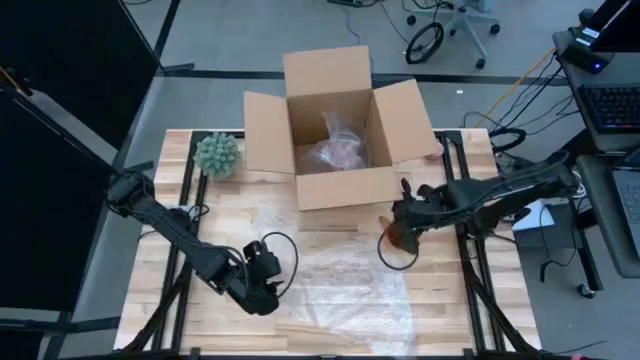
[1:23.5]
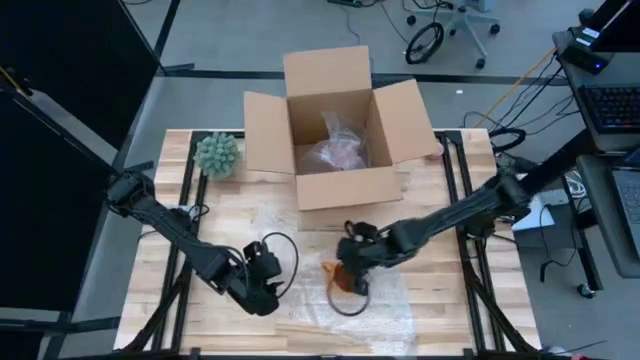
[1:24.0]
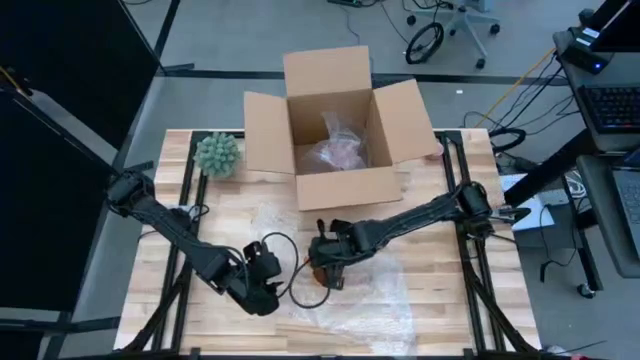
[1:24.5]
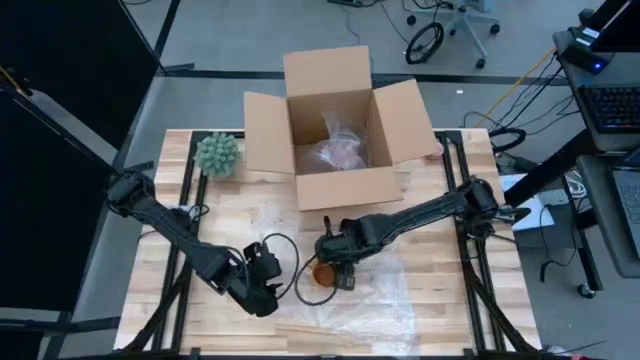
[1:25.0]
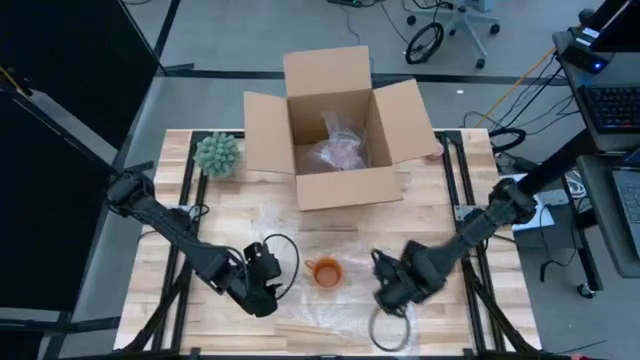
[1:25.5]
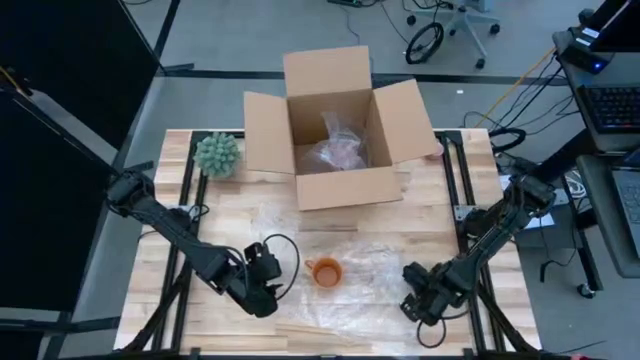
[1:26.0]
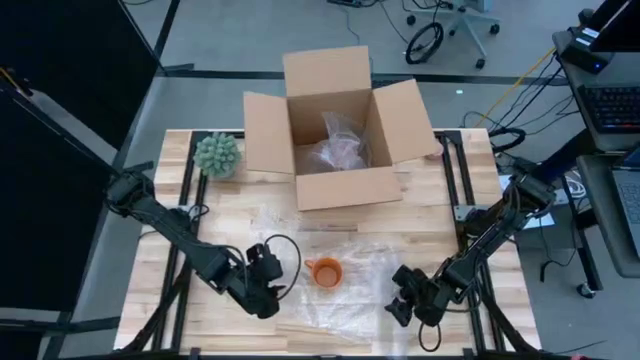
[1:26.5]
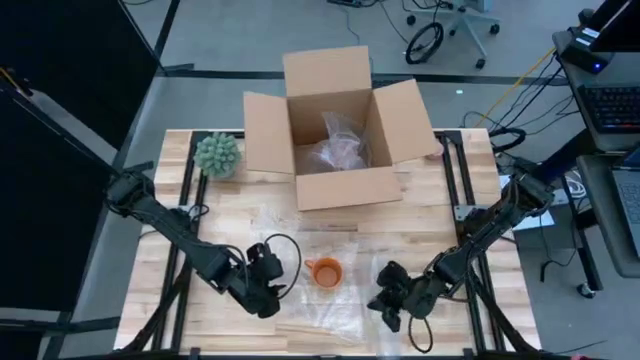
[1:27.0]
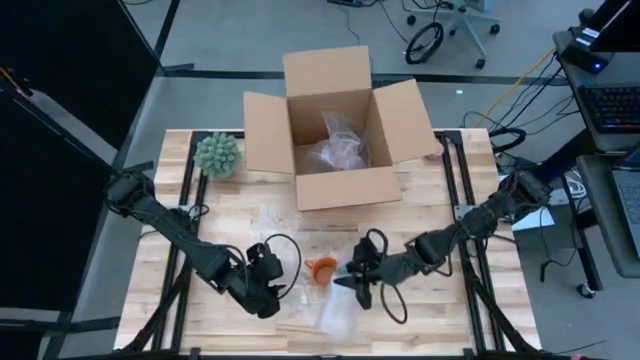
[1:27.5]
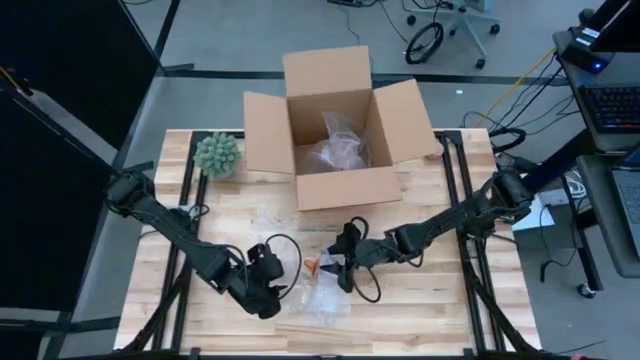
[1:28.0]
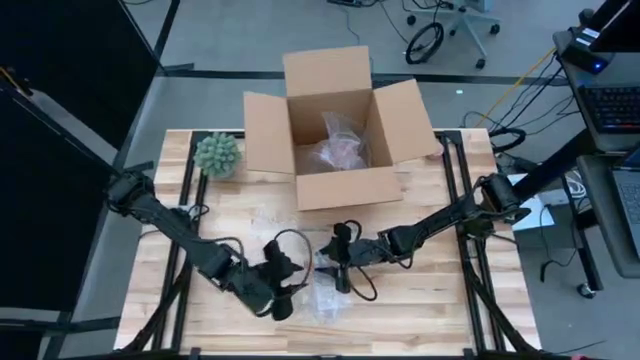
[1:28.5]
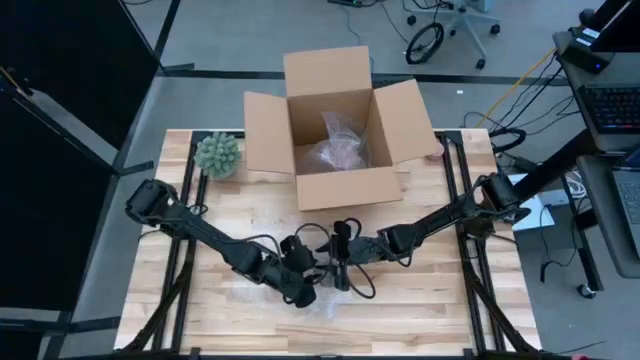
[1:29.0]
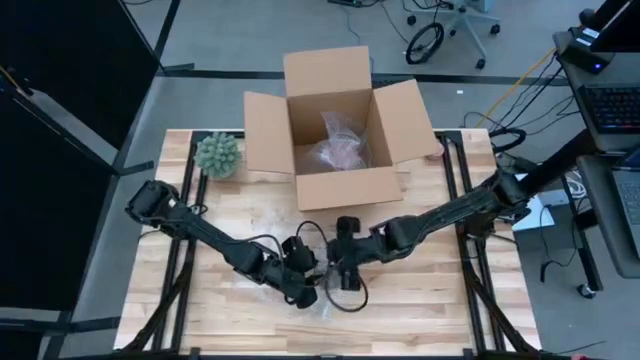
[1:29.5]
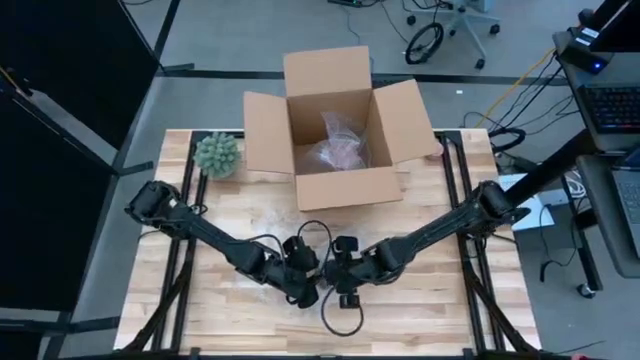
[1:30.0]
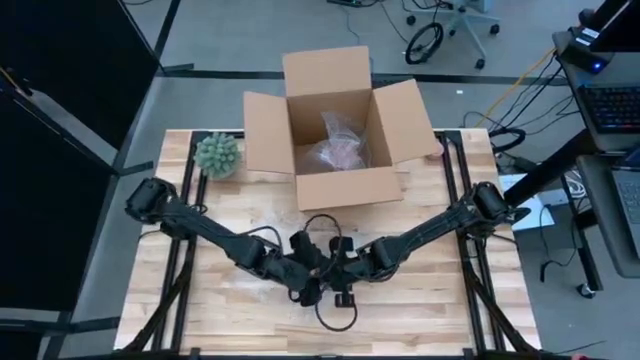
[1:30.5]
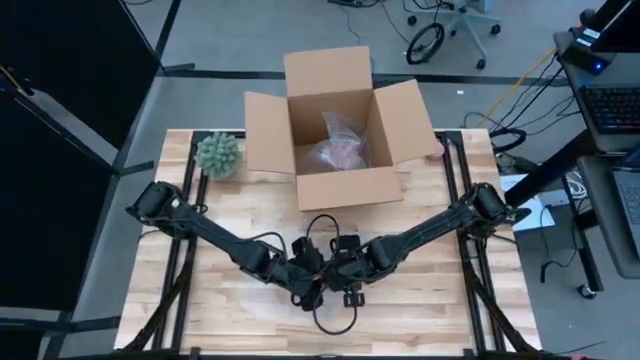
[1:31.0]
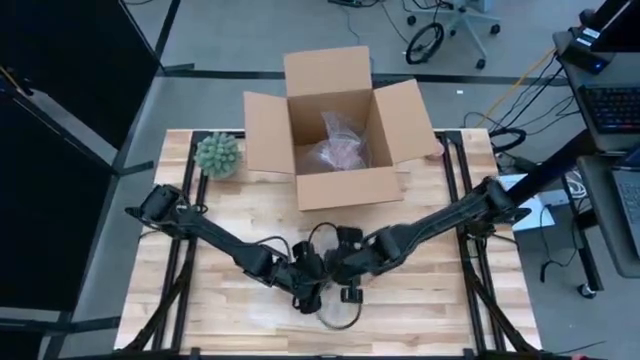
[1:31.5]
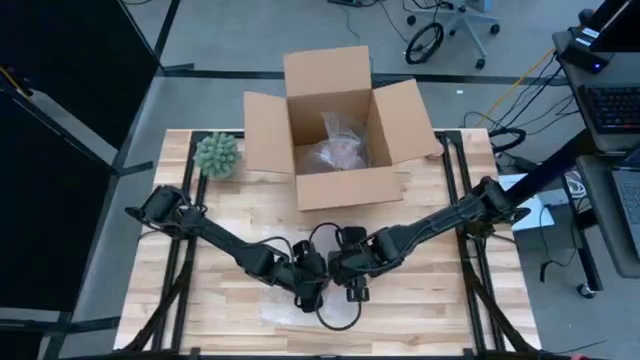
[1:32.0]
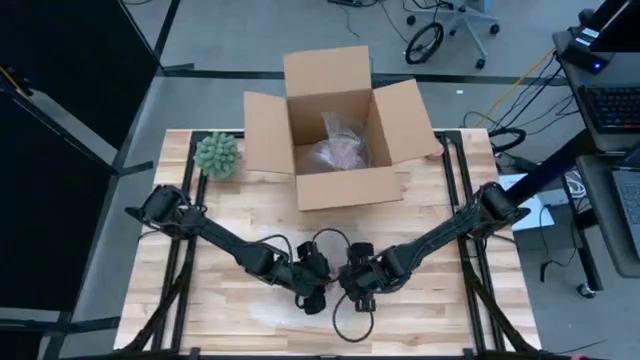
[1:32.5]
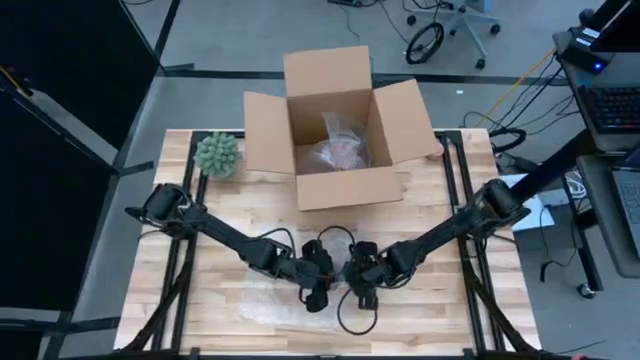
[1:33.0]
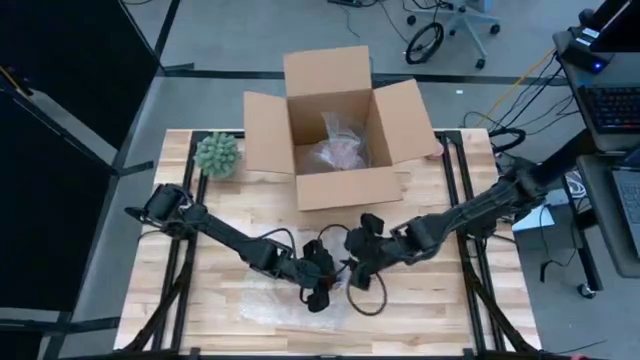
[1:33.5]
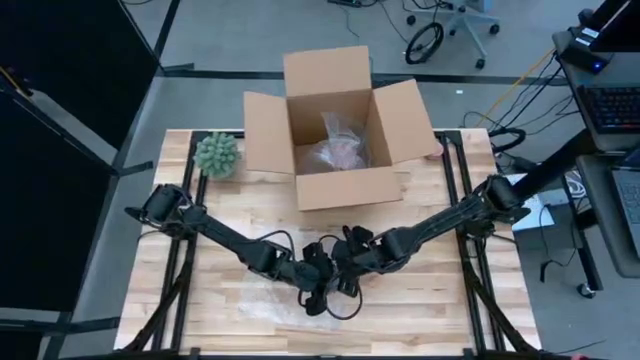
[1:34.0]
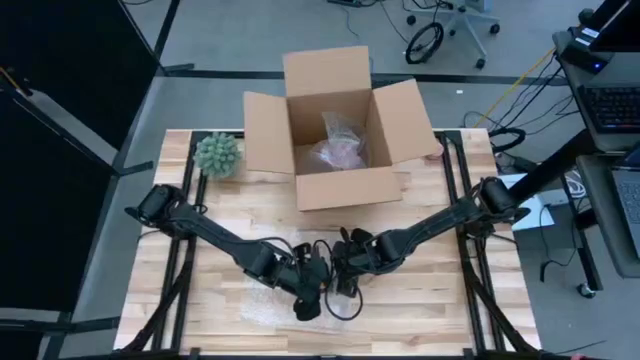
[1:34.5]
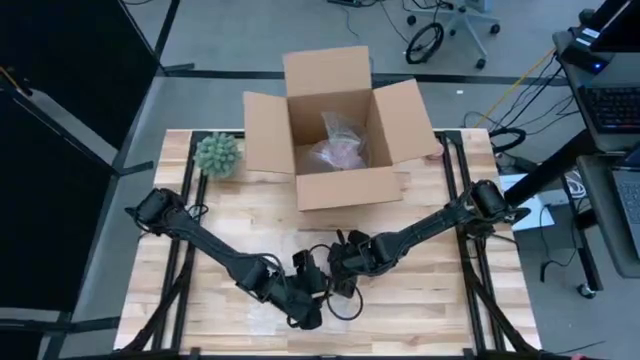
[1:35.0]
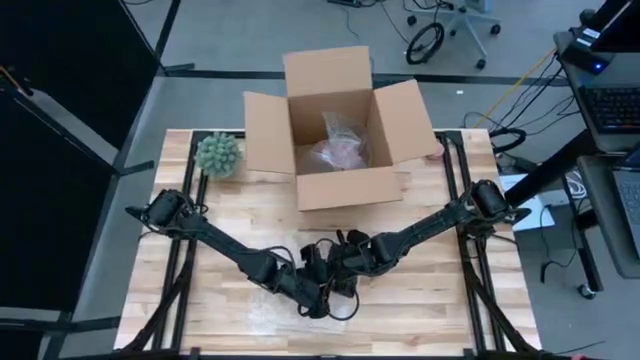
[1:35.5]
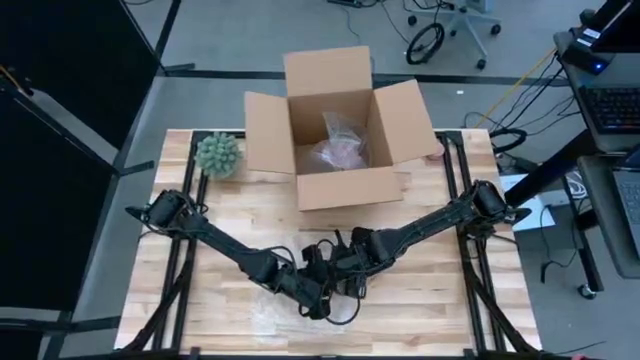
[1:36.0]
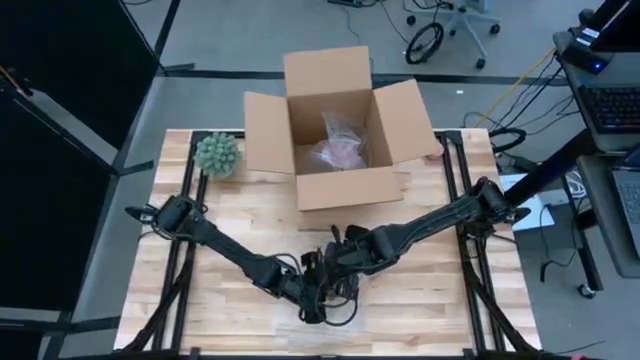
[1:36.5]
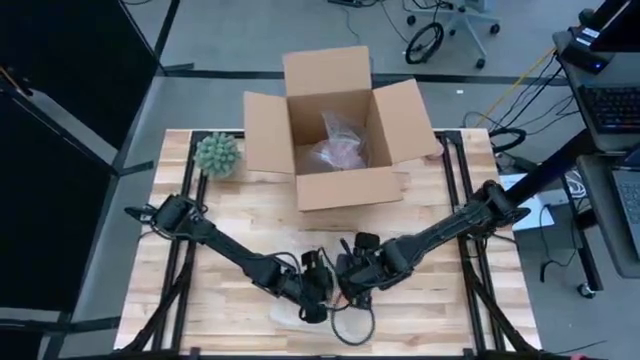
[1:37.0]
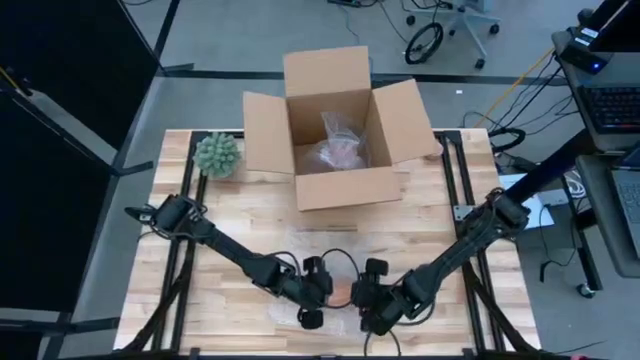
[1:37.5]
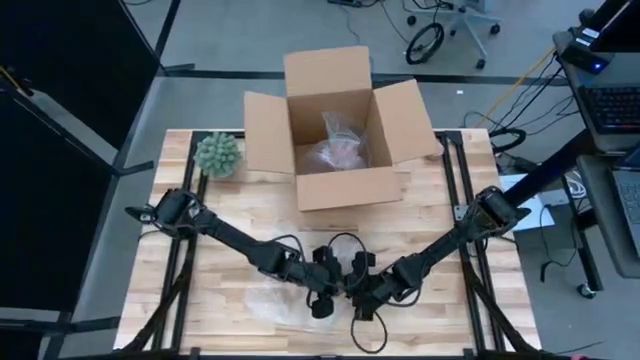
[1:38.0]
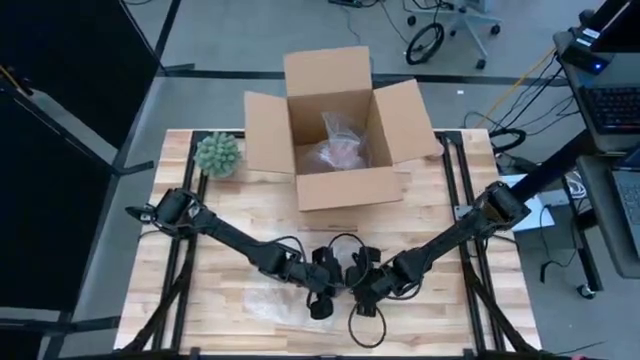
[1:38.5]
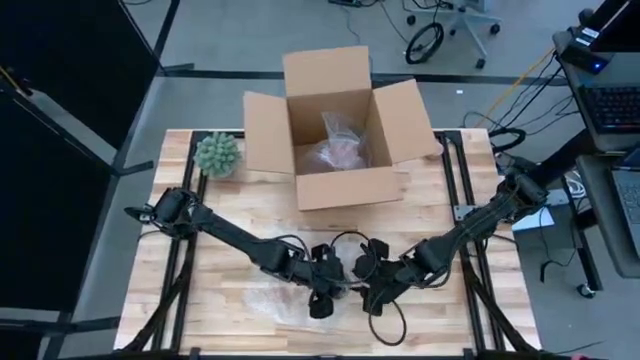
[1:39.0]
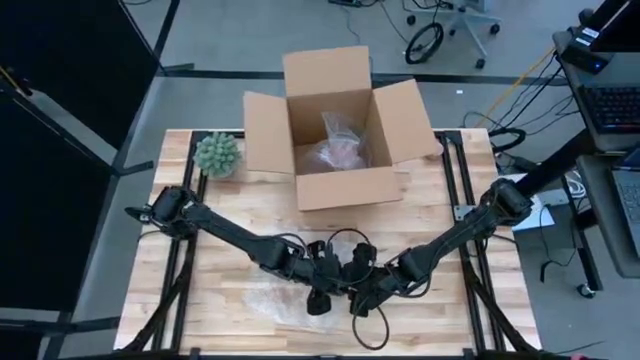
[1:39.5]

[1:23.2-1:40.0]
Task: wrap mug
Wrap the orange mug with the left bubble wrap

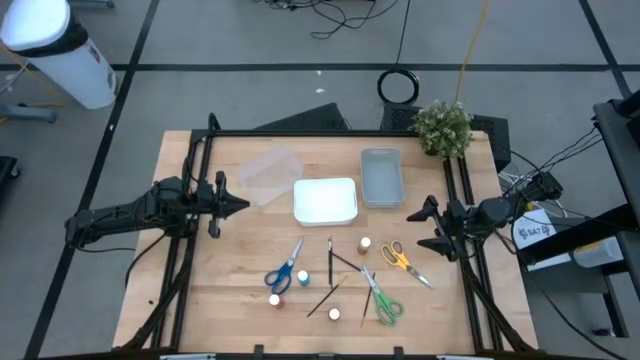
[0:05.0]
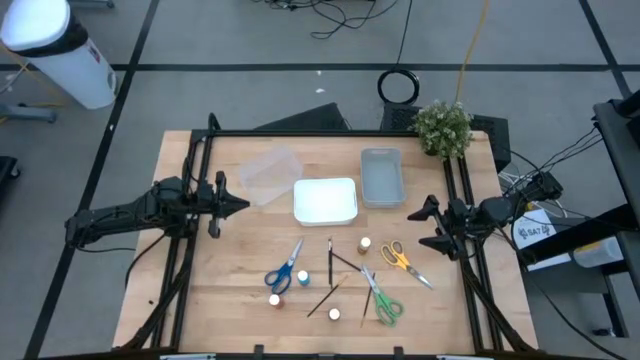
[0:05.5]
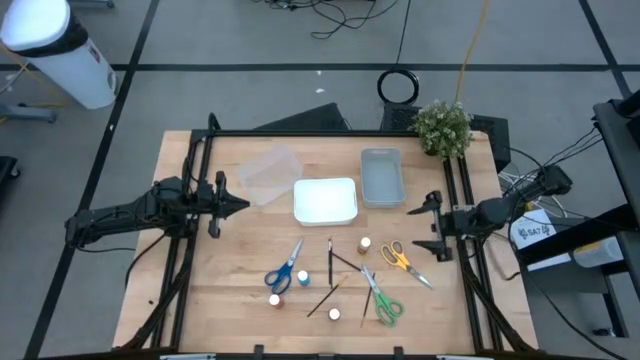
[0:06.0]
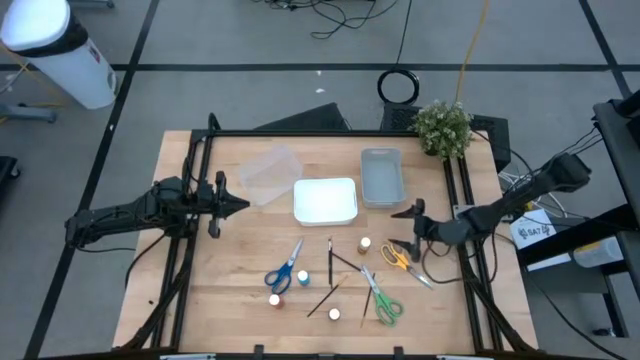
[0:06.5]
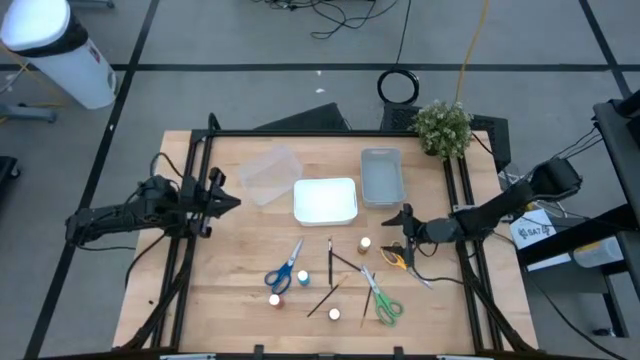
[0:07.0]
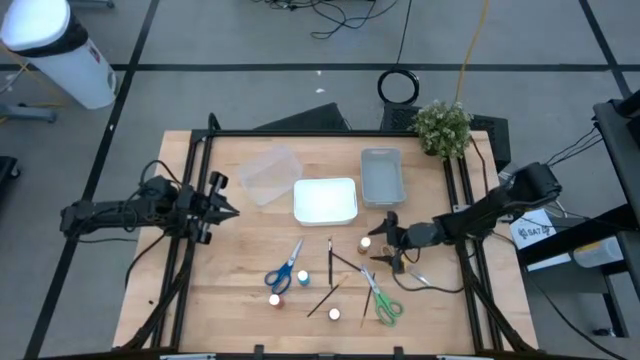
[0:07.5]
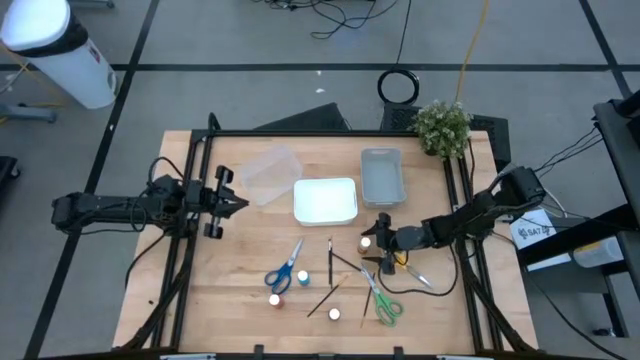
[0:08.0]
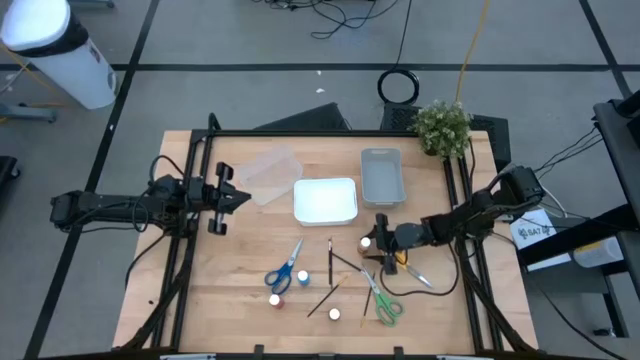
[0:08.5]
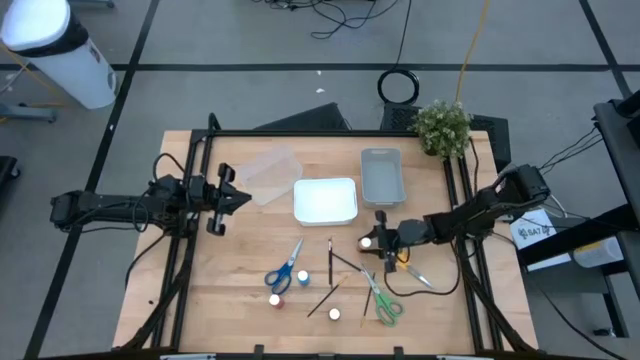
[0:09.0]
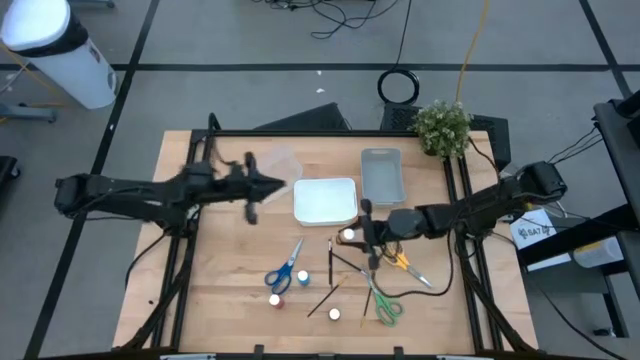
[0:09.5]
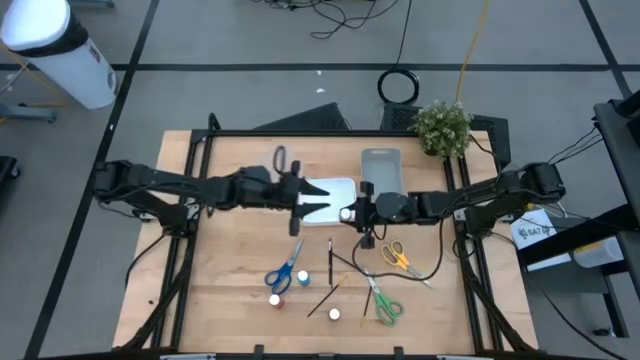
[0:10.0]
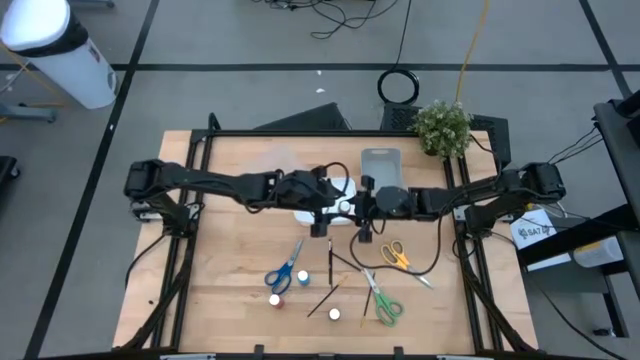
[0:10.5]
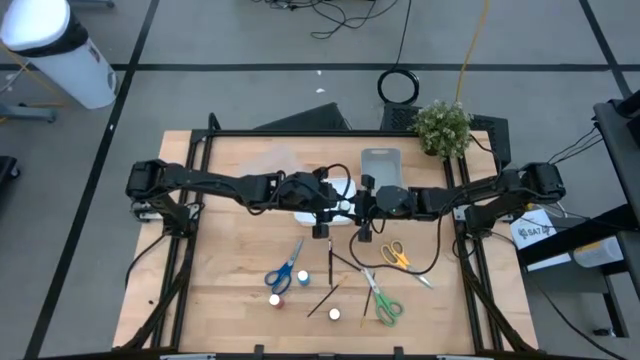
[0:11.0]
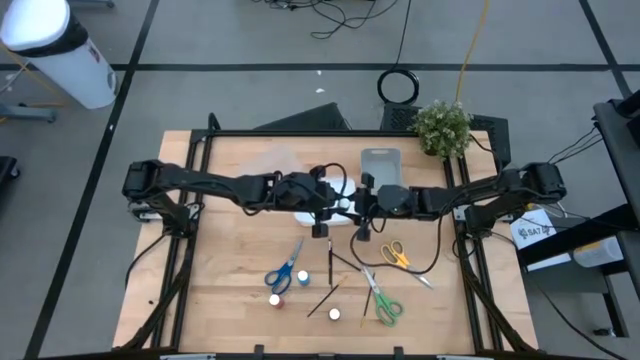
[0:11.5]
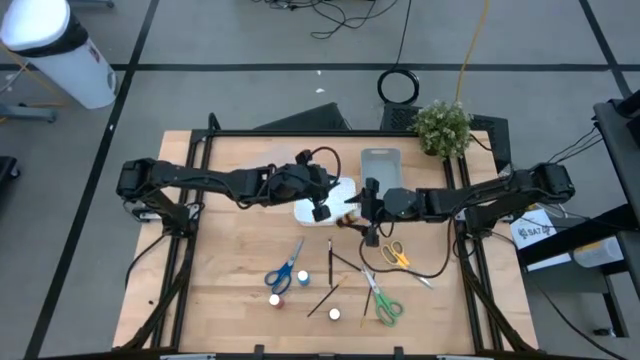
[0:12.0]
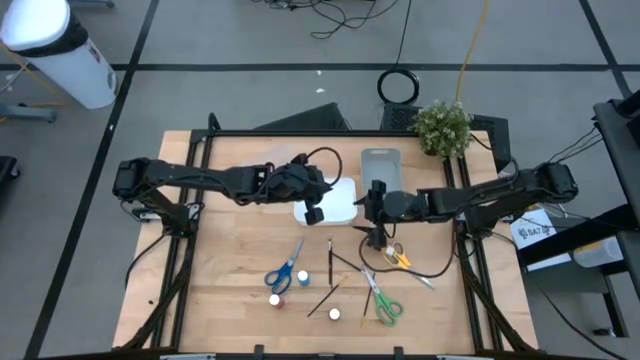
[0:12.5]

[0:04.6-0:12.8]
Task: Pick & Place Paint Supplies
Put the yellow paint bottle in the gray bin
